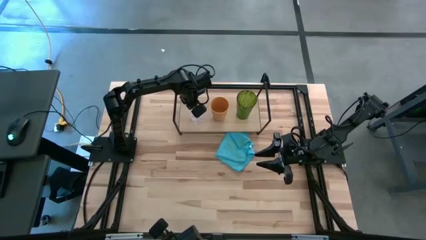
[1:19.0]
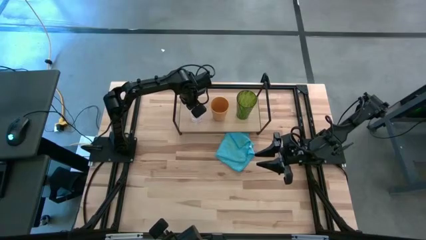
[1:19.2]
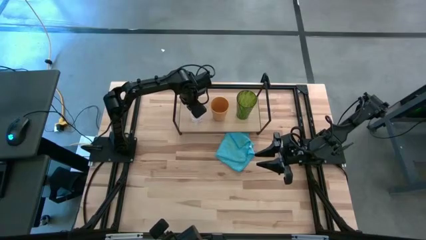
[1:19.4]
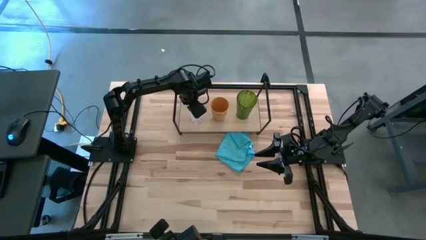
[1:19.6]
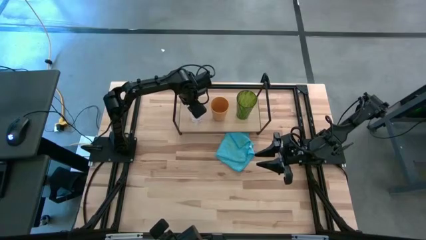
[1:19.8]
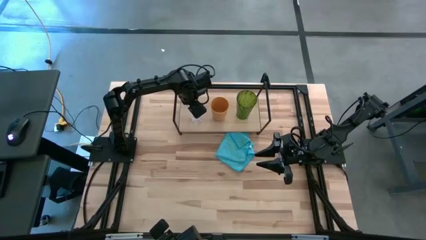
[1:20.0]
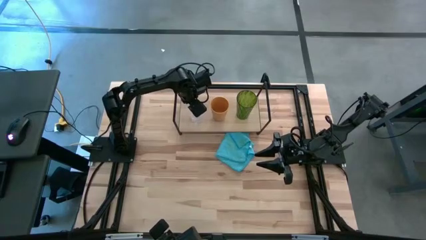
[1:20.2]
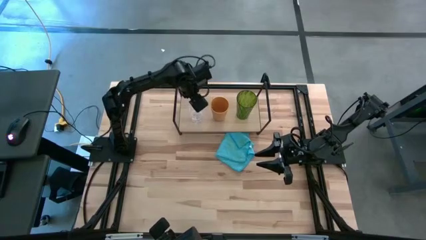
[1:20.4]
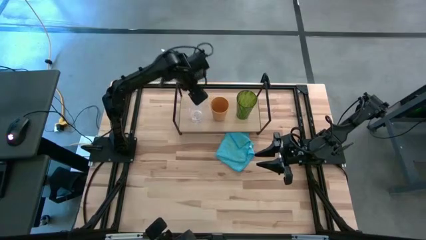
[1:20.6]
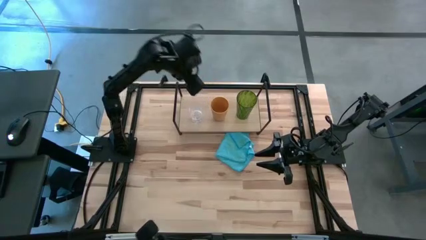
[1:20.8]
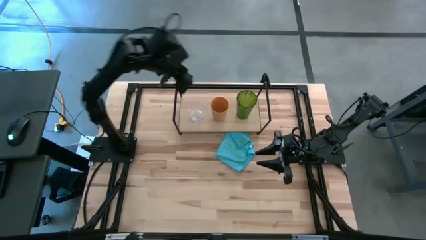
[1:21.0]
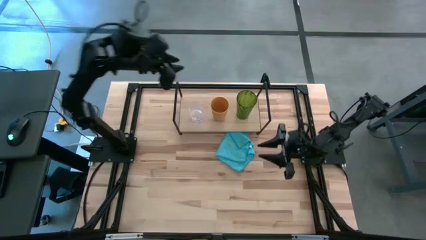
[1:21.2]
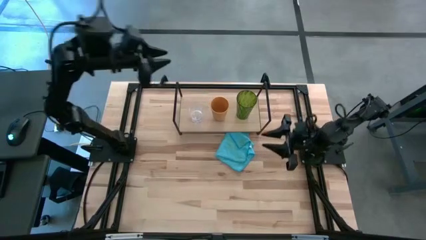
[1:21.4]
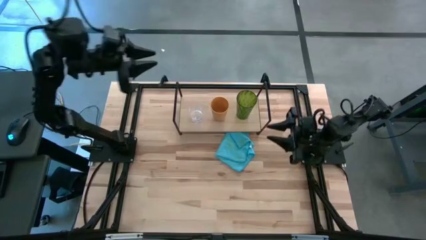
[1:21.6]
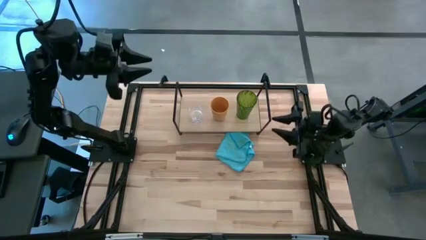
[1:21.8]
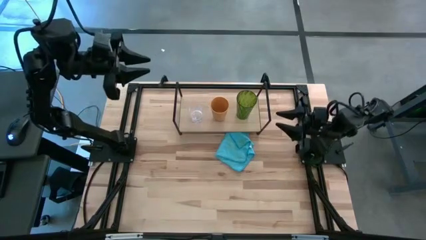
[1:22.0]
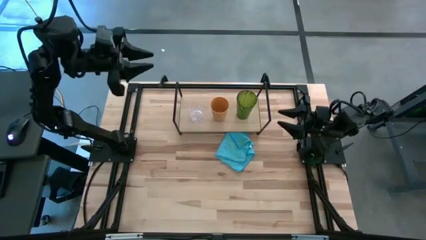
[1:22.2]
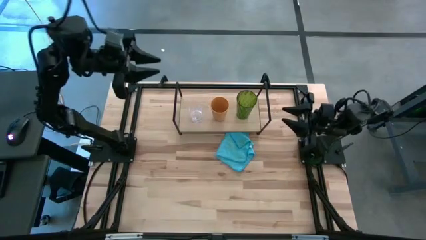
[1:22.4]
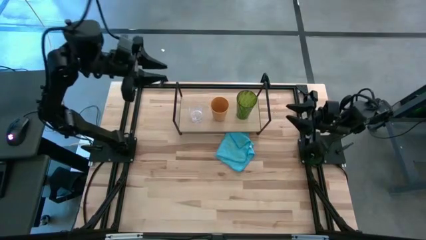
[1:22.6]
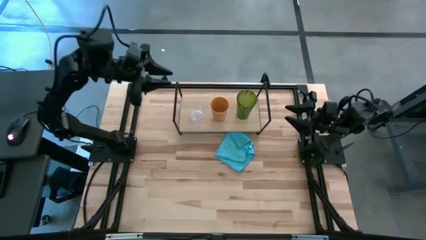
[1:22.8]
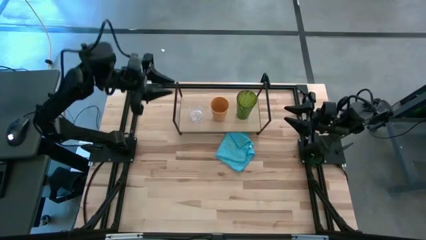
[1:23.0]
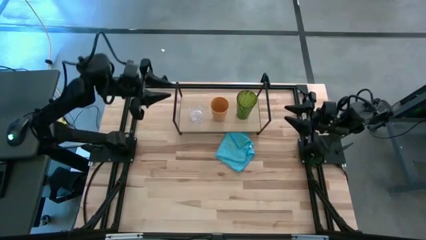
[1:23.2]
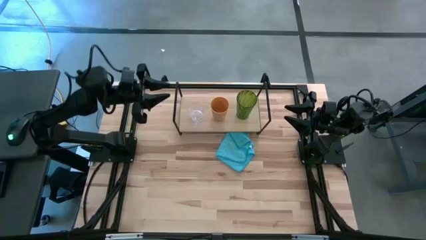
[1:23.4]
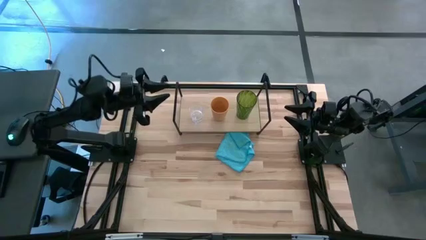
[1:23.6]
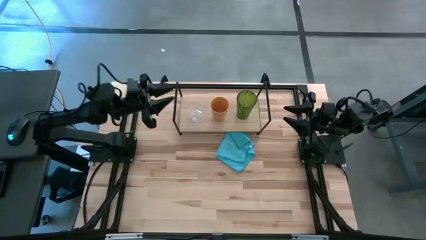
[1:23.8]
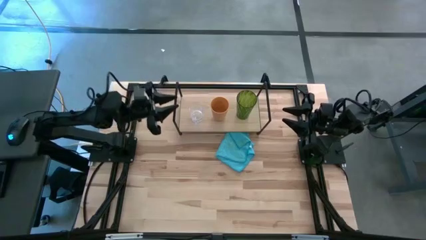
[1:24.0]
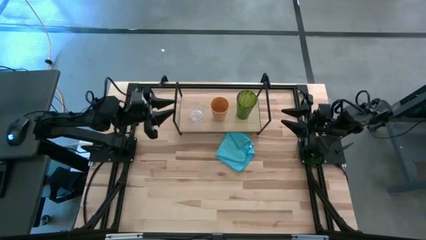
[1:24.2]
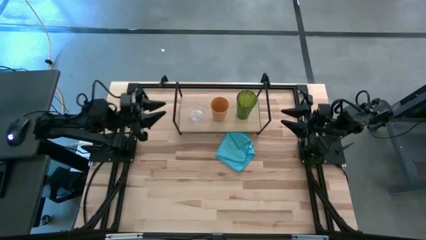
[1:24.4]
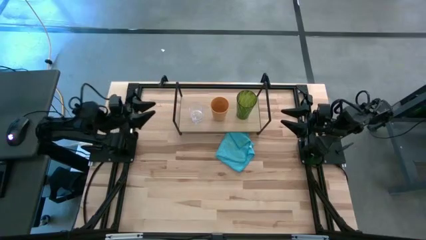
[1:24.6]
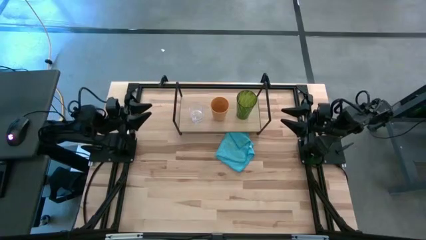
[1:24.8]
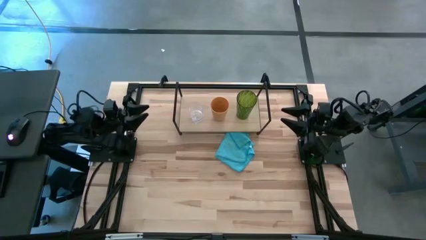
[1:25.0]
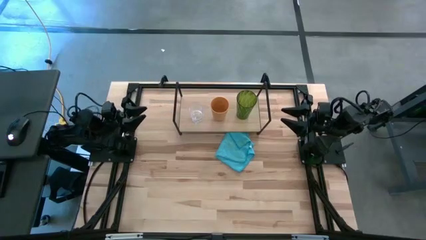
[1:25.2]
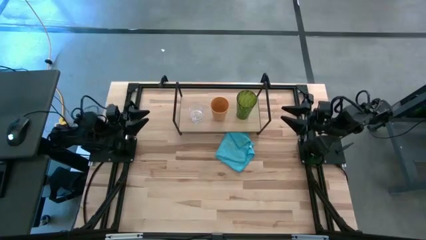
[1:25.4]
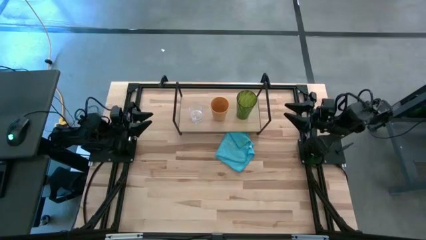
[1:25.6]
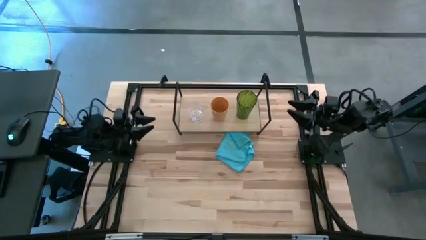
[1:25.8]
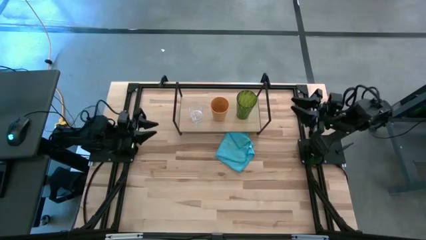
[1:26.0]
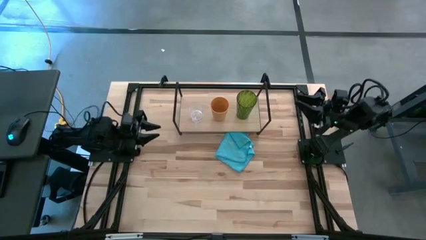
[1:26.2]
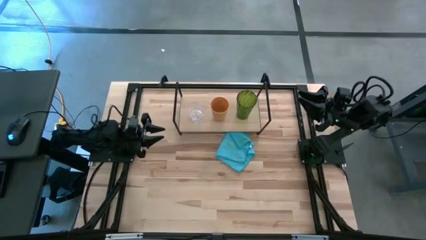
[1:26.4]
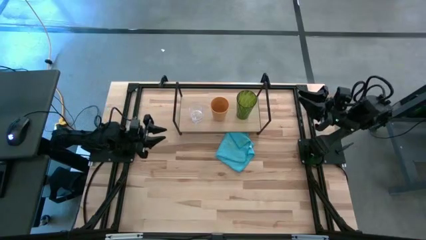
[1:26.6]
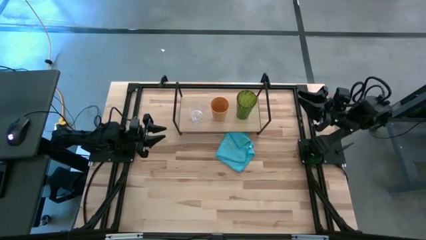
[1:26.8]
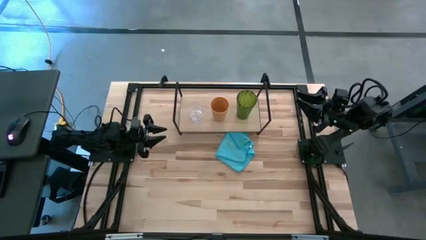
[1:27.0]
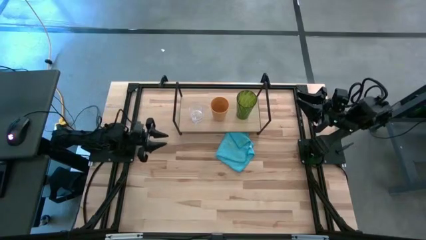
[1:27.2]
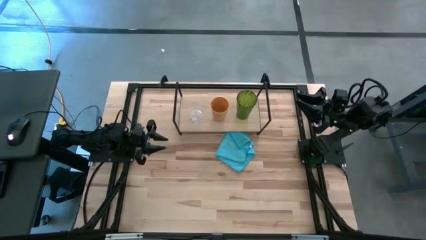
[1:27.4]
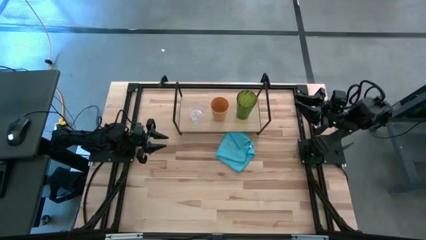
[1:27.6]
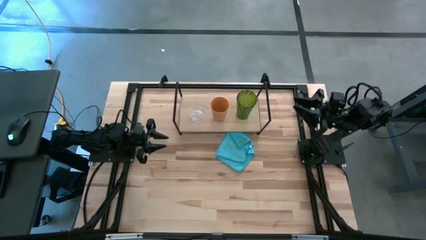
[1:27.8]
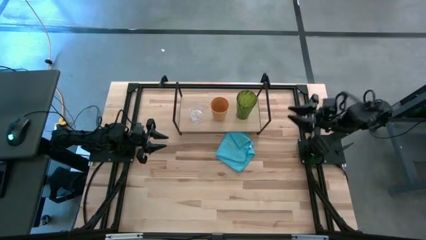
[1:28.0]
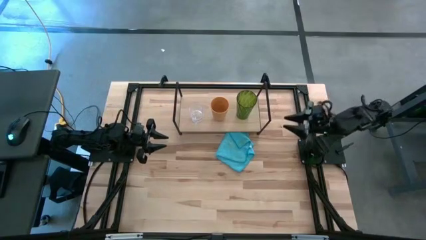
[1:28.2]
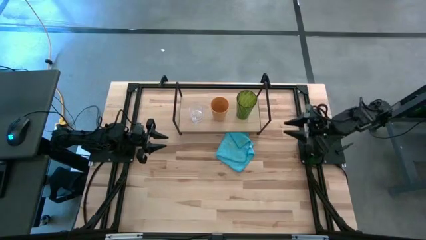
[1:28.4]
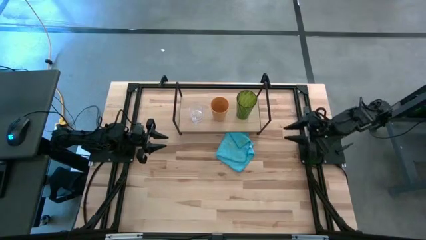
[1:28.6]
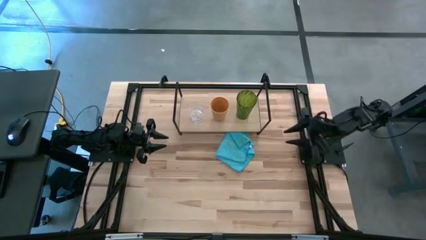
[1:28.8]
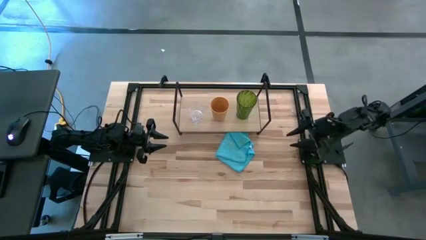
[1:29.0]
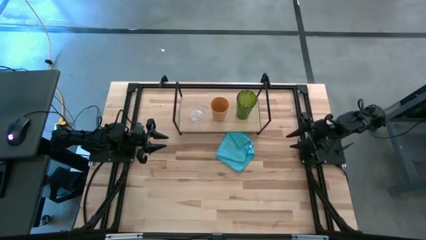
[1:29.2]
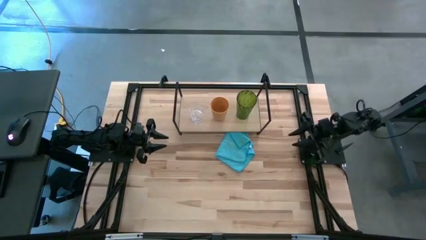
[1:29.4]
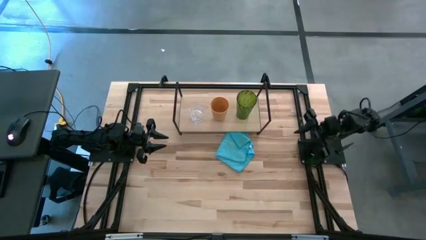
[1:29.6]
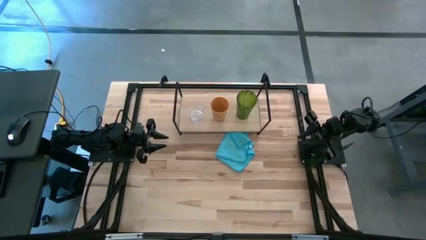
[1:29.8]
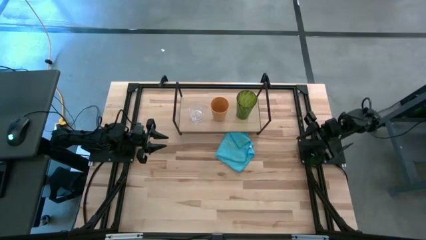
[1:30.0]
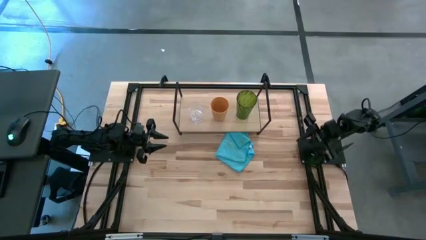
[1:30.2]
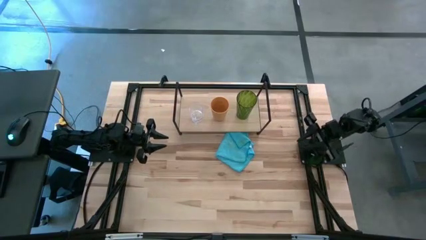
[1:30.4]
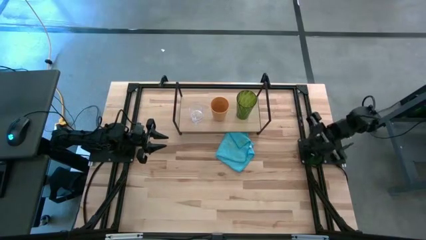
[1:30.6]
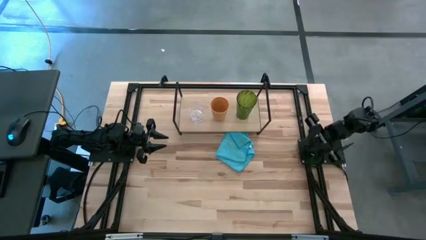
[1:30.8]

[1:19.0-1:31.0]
Task: Stack small to large cups/mugs on shelf
Return to Home Position
